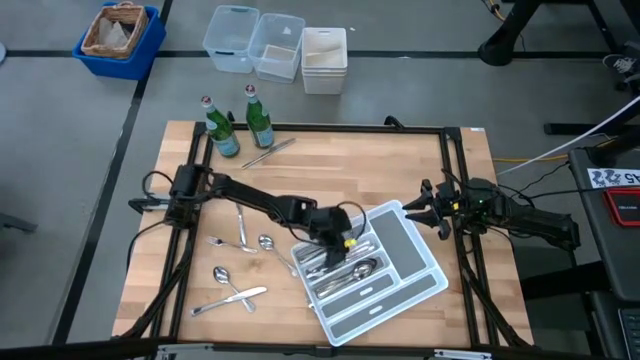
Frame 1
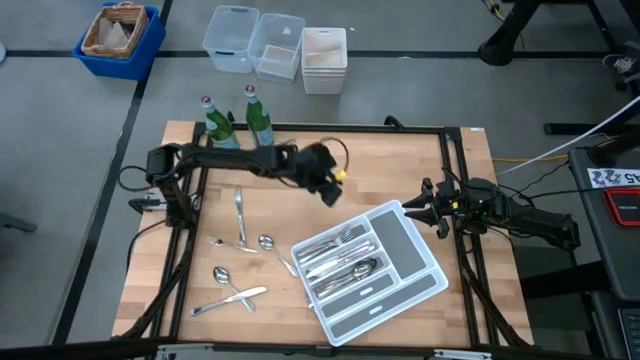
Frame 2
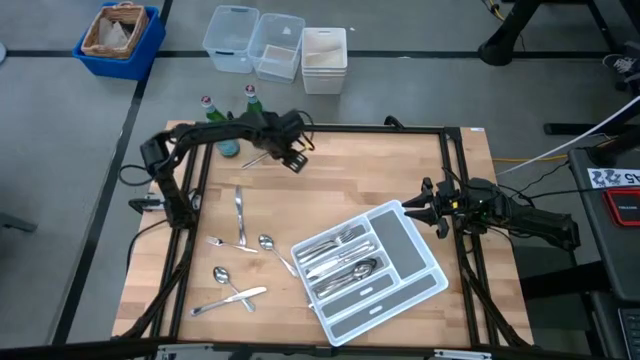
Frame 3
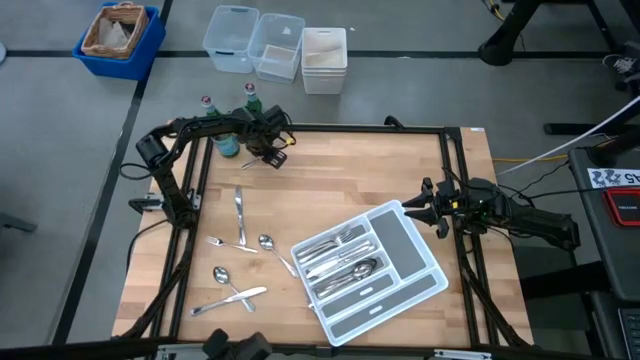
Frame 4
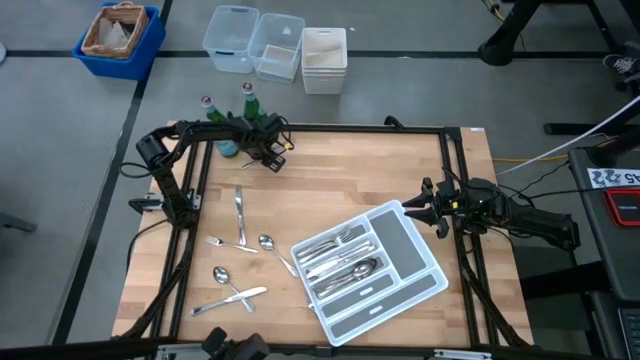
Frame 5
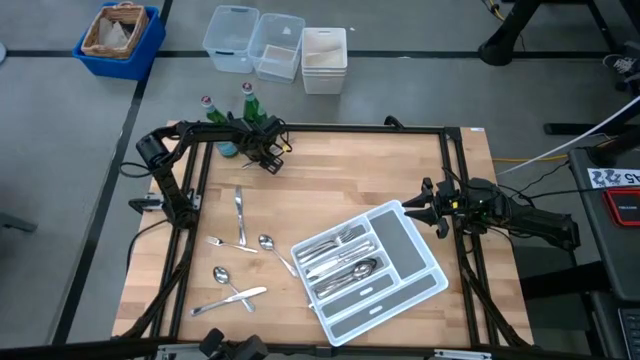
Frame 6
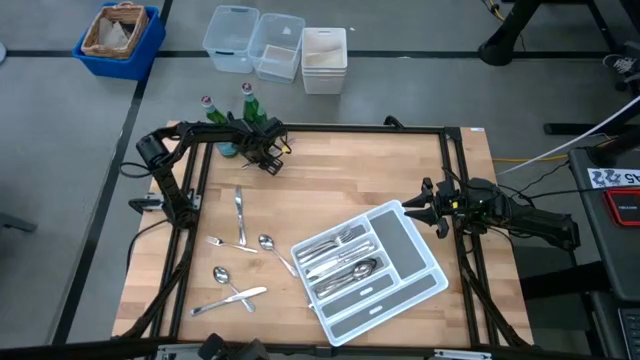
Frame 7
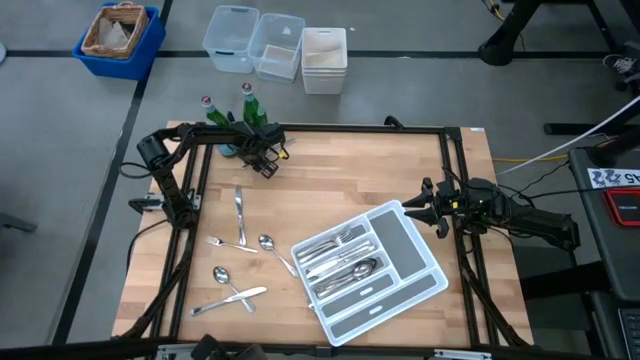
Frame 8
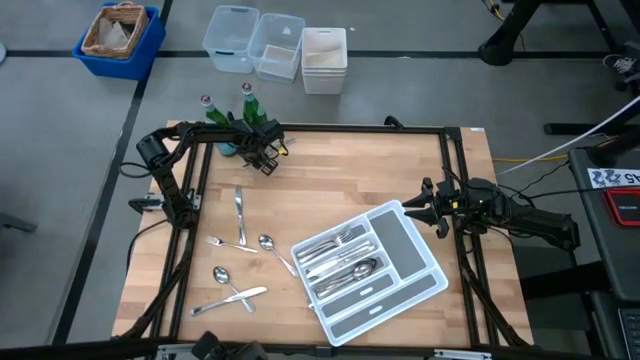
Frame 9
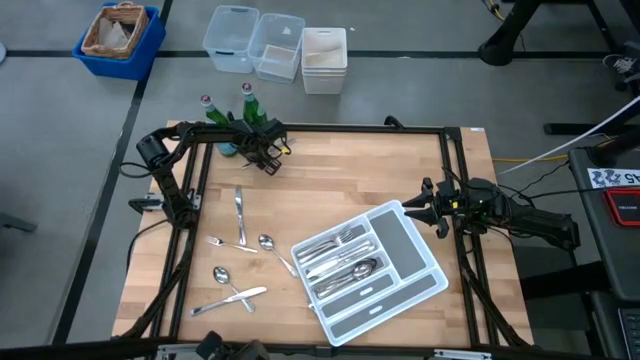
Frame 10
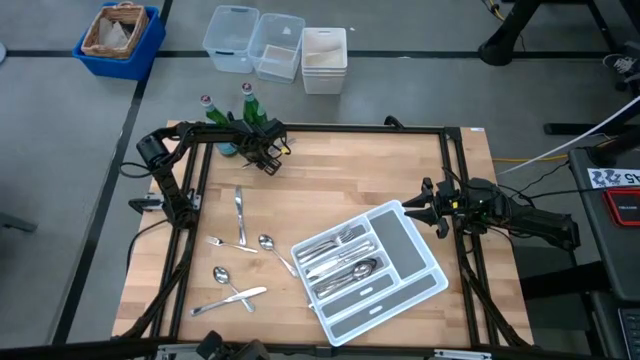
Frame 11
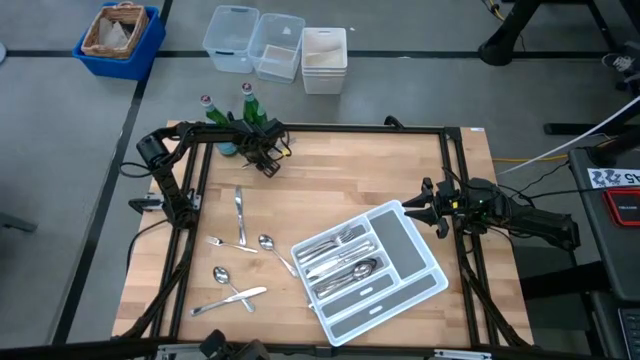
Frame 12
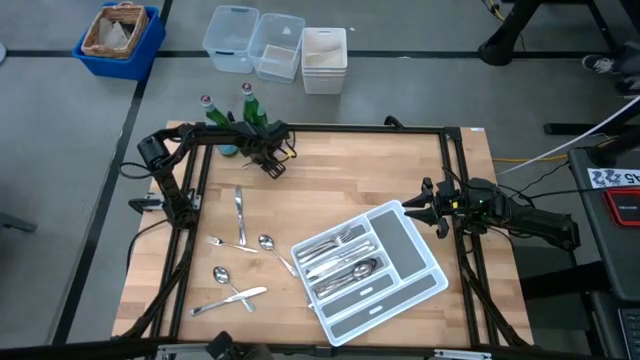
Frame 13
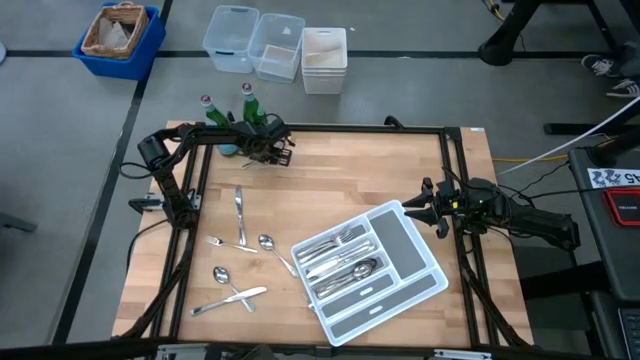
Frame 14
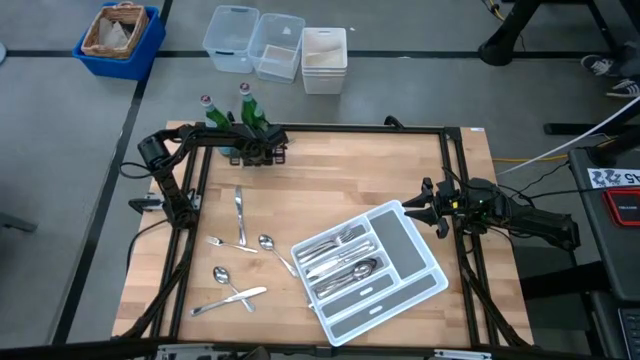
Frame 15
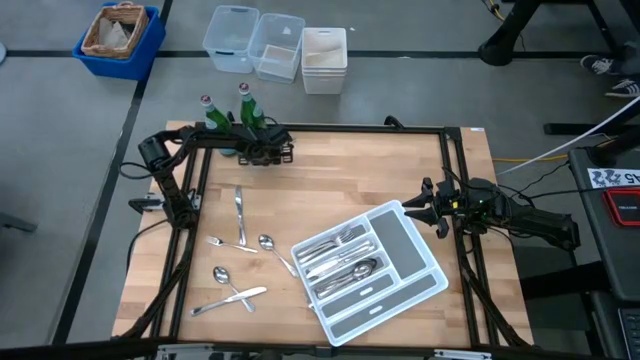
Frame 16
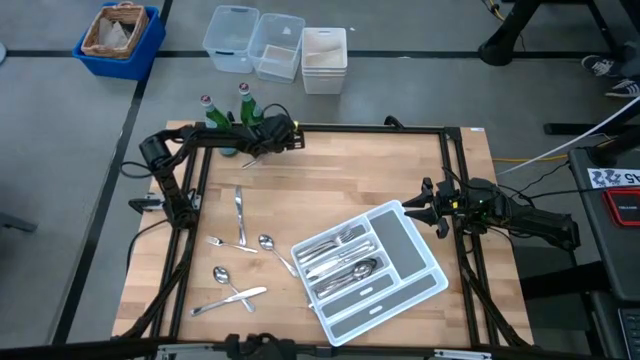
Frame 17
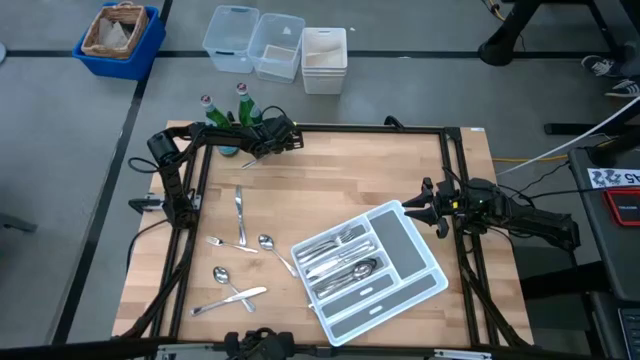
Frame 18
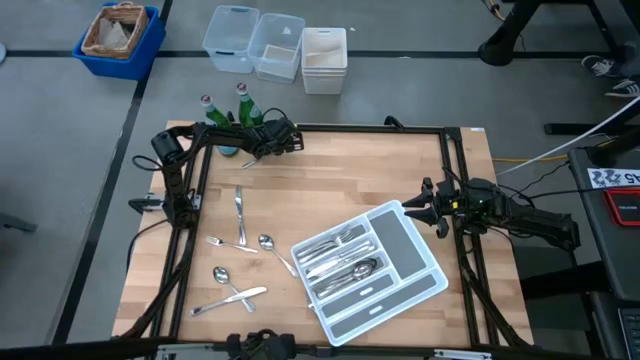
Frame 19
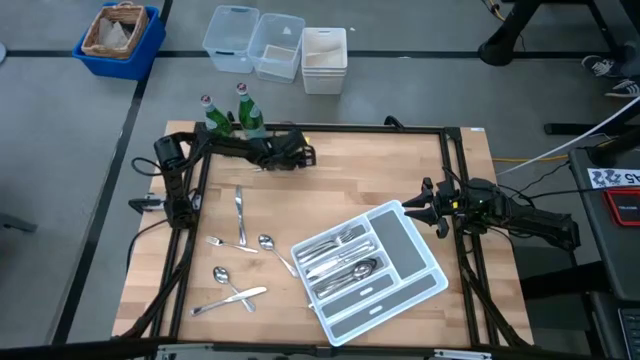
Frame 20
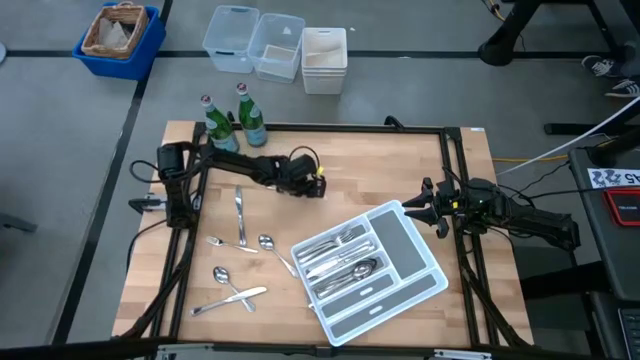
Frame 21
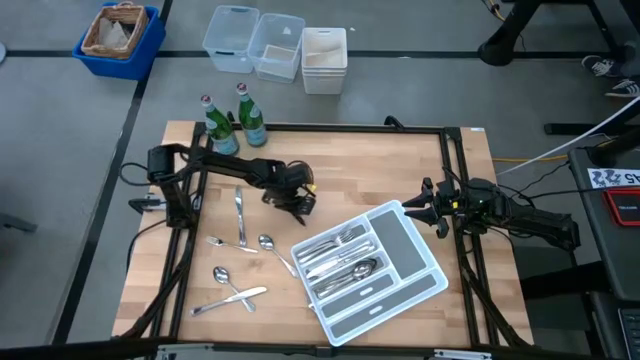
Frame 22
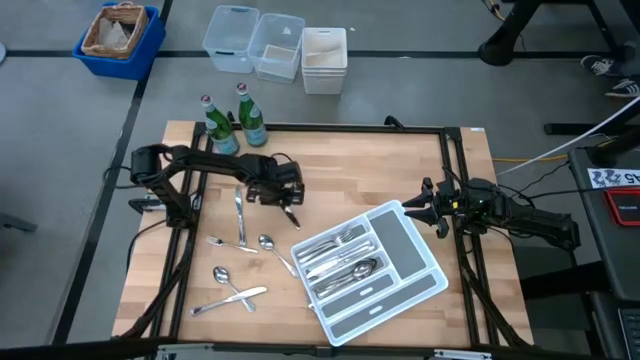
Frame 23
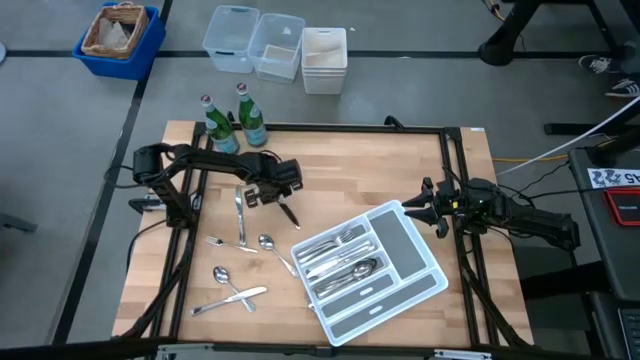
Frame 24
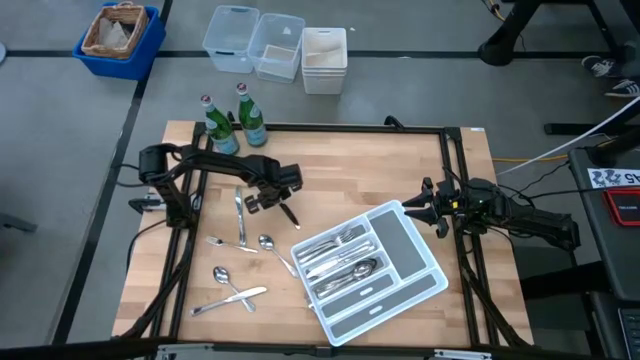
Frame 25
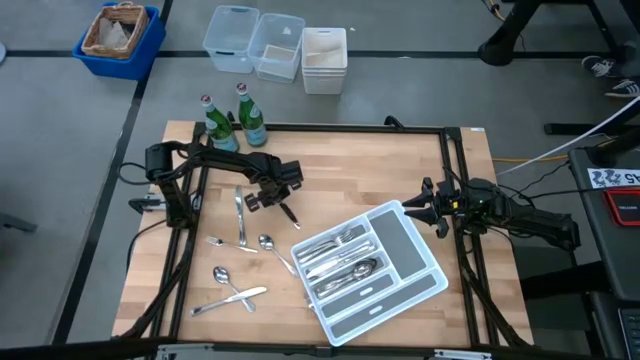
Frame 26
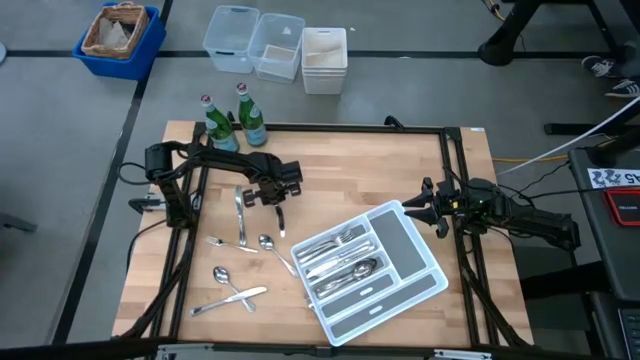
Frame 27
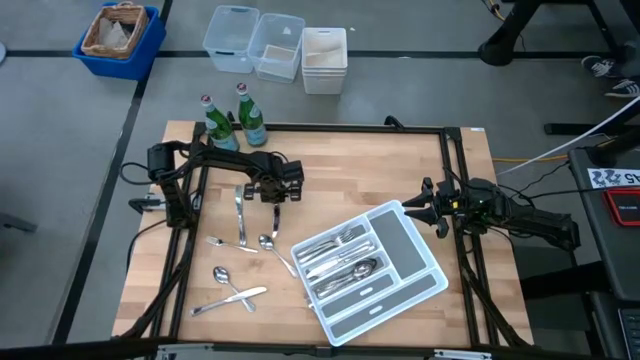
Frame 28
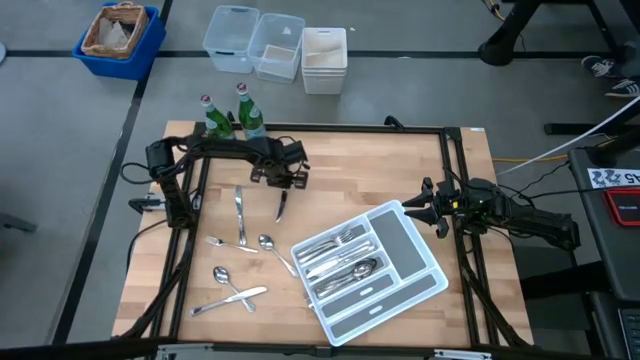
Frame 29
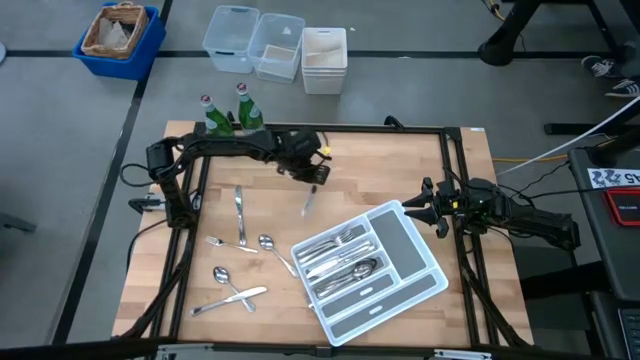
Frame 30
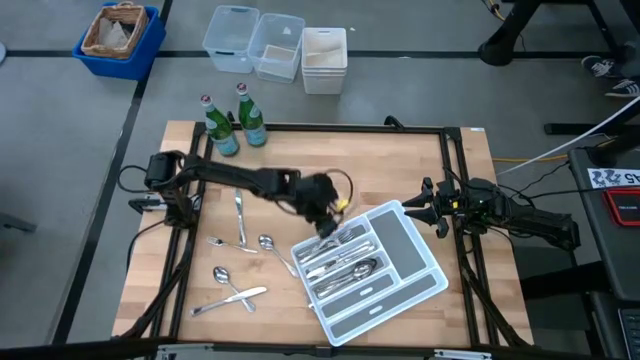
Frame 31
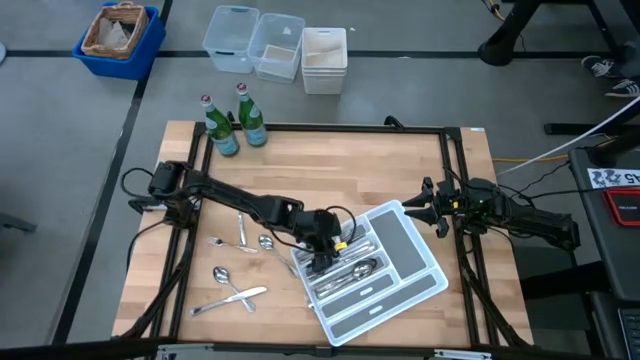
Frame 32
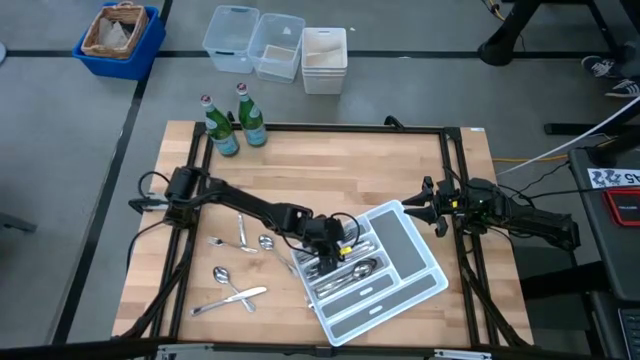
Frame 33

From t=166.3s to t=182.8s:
Task: Sort silverware
Put the silver table knife into the white silverware tray

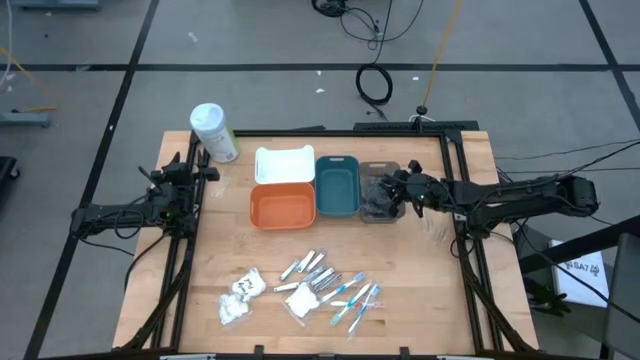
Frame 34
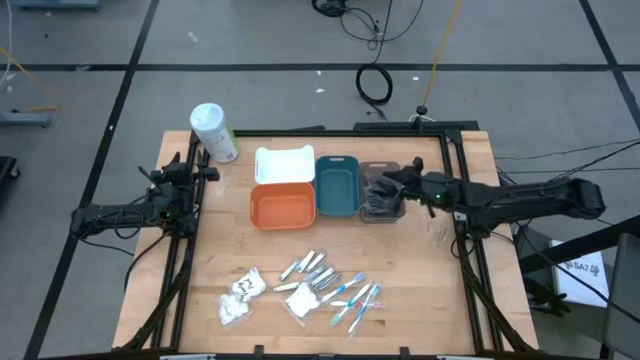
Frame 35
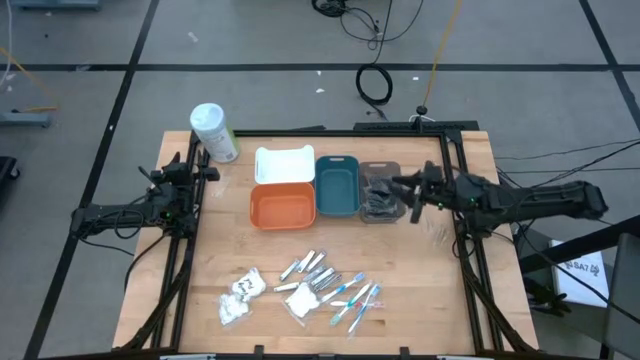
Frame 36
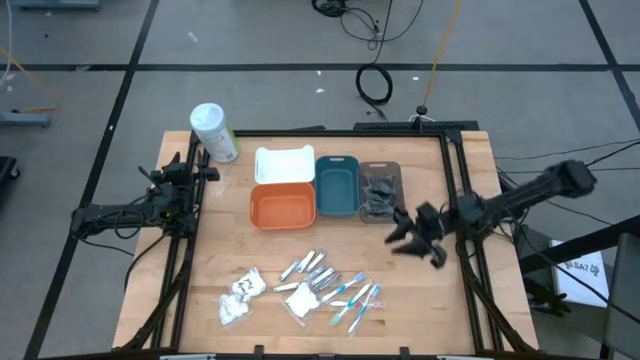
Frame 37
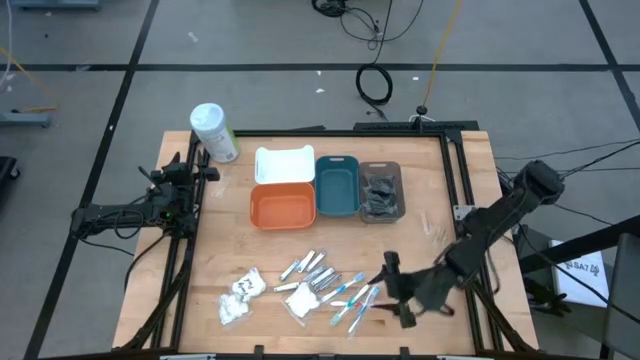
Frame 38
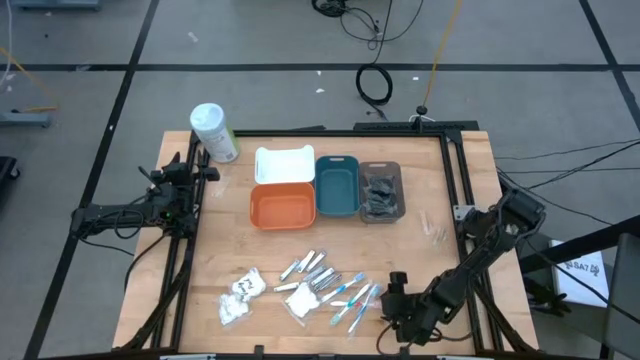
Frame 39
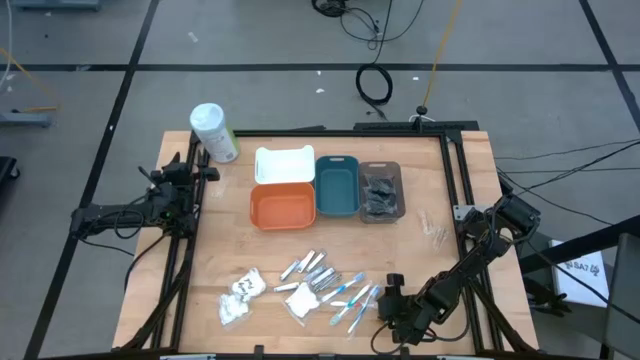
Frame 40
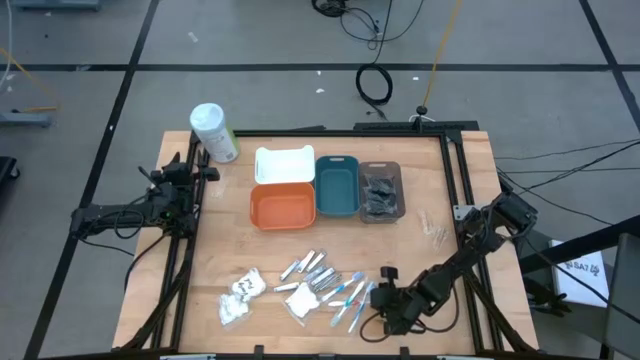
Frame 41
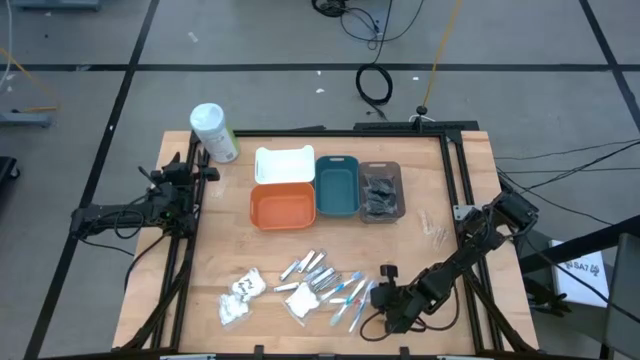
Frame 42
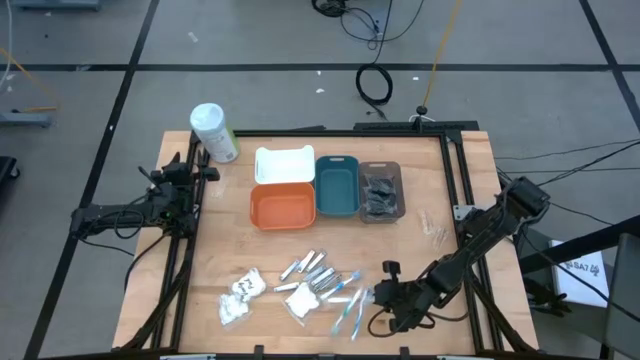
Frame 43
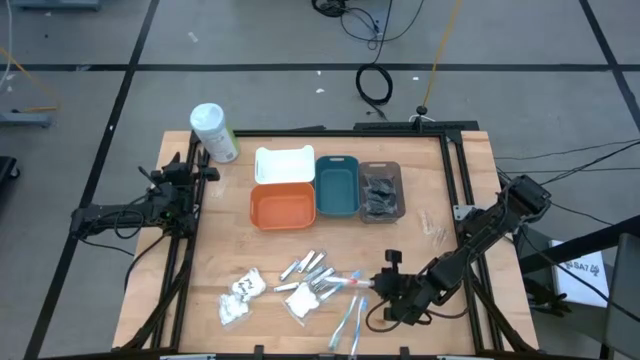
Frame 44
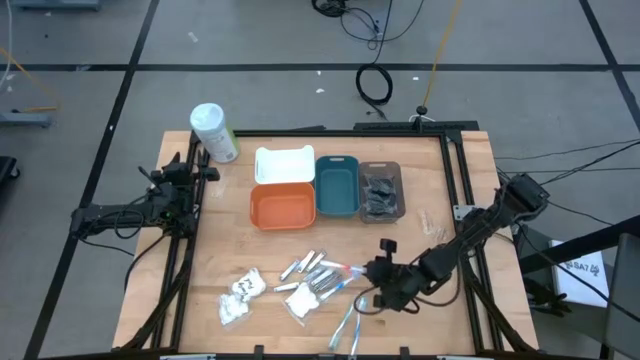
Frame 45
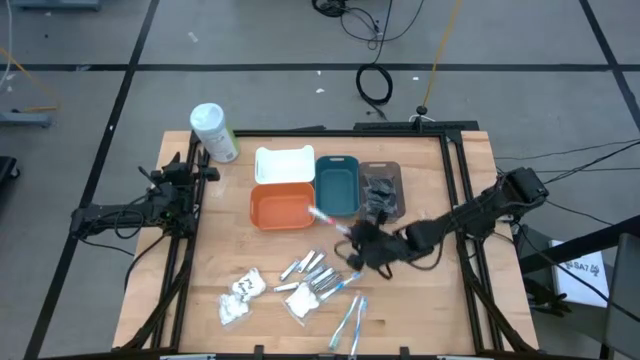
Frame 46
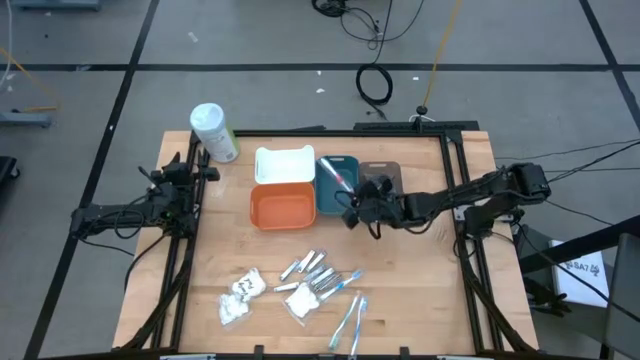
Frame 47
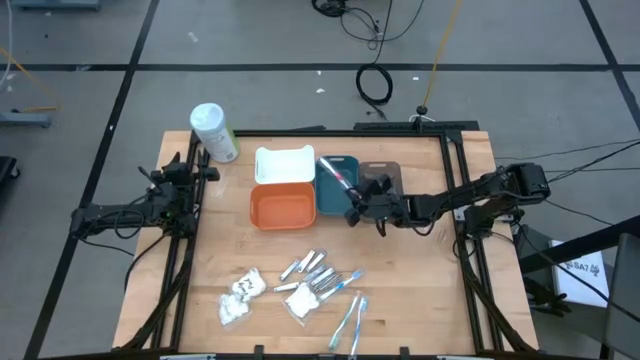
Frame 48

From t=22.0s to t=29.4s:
Task: Pick & Place Travel size toiletries
Put the red toothbrush into the dark green bin
